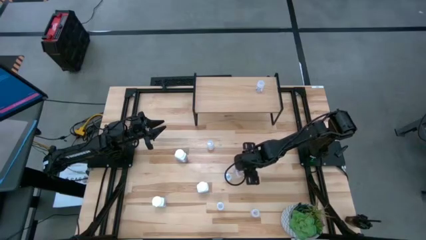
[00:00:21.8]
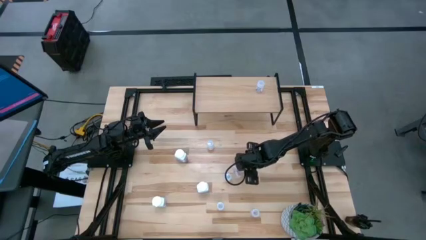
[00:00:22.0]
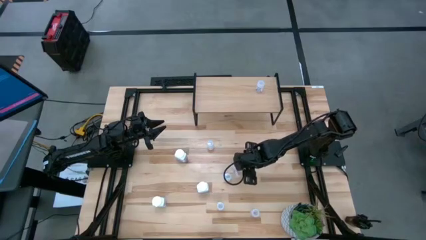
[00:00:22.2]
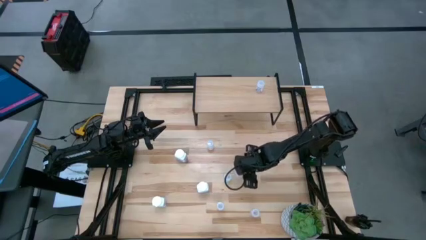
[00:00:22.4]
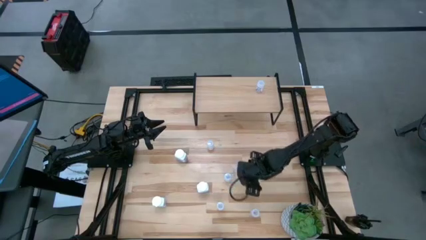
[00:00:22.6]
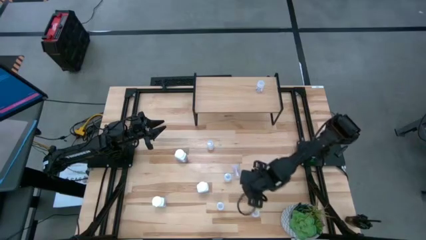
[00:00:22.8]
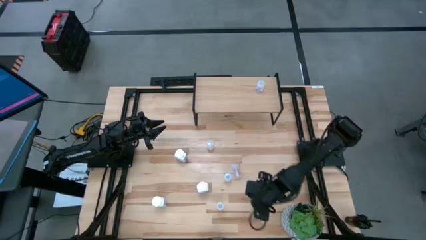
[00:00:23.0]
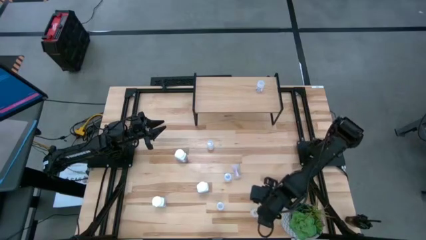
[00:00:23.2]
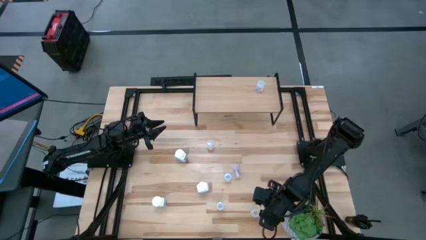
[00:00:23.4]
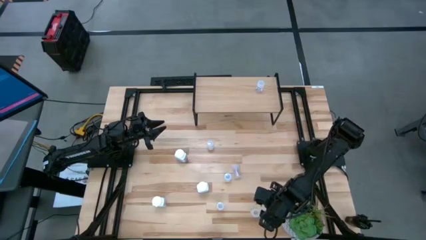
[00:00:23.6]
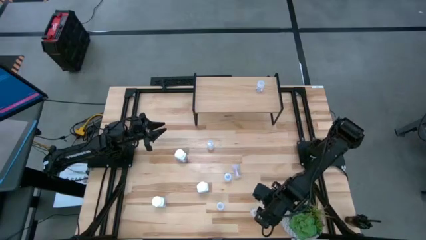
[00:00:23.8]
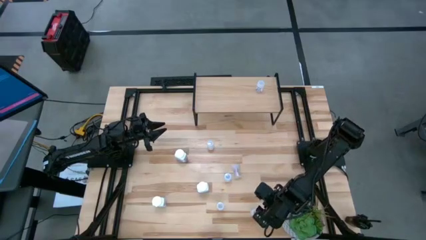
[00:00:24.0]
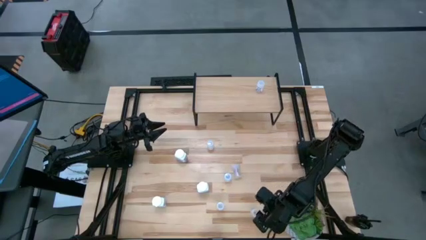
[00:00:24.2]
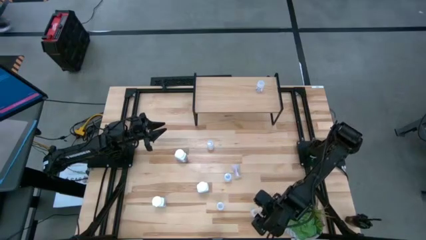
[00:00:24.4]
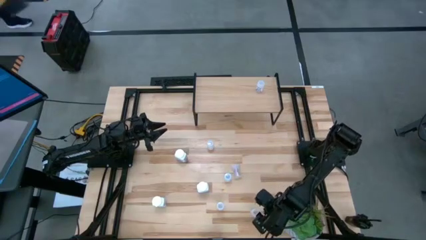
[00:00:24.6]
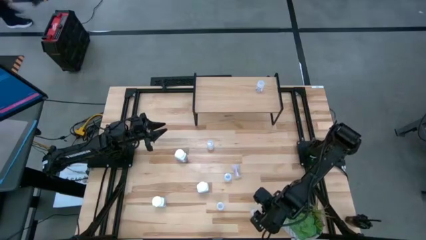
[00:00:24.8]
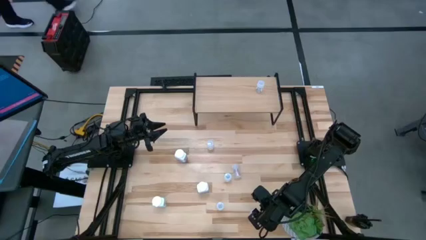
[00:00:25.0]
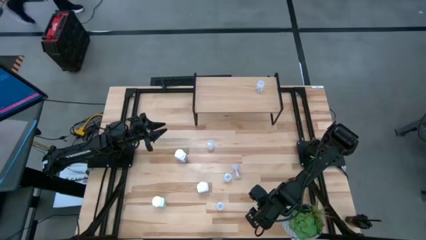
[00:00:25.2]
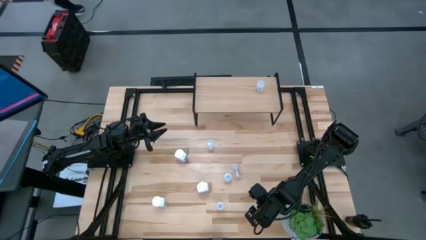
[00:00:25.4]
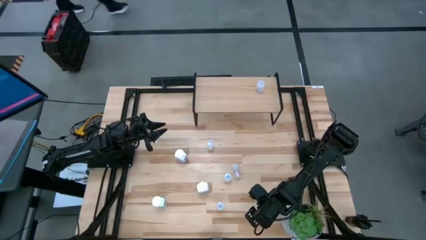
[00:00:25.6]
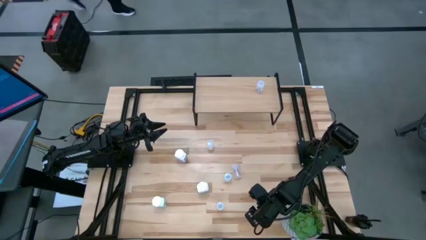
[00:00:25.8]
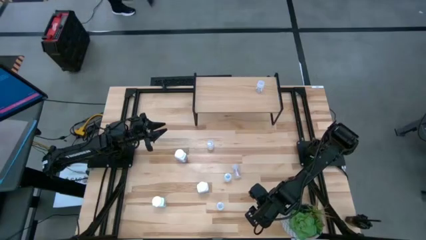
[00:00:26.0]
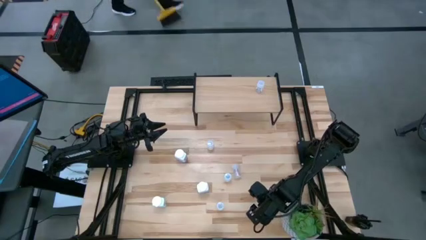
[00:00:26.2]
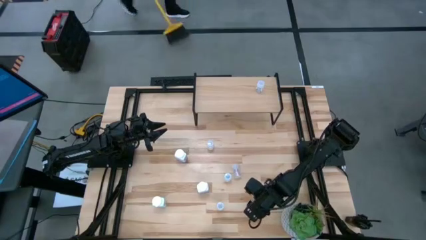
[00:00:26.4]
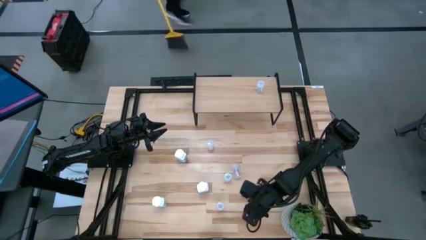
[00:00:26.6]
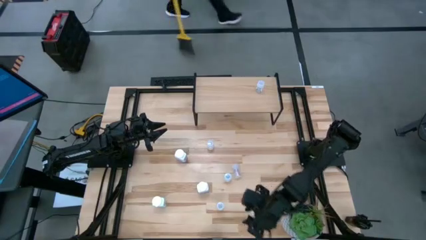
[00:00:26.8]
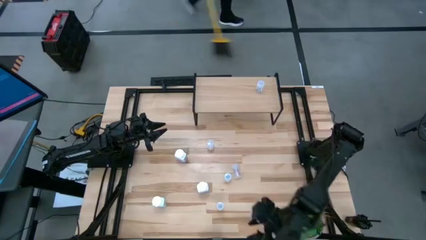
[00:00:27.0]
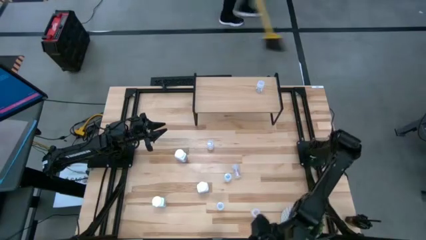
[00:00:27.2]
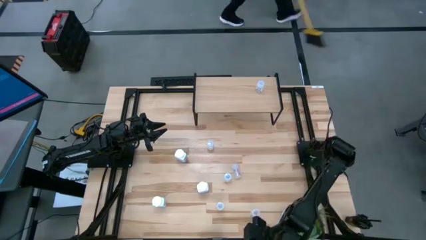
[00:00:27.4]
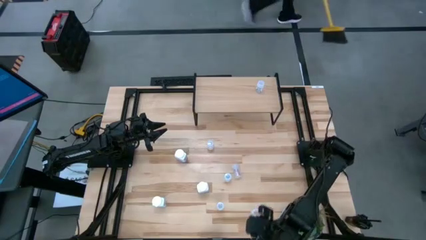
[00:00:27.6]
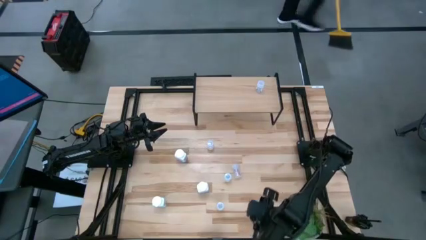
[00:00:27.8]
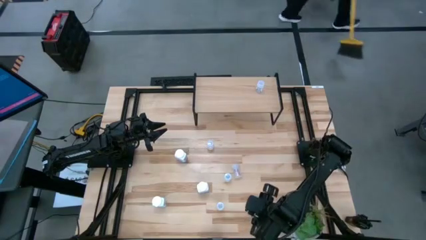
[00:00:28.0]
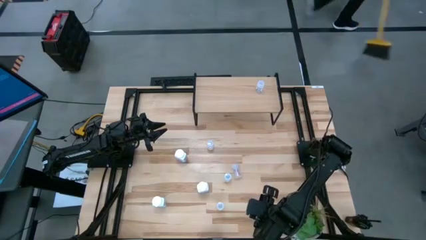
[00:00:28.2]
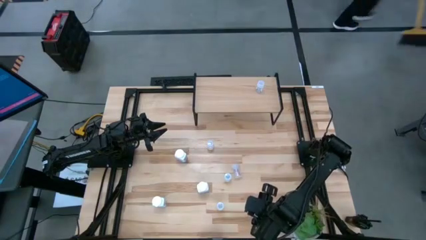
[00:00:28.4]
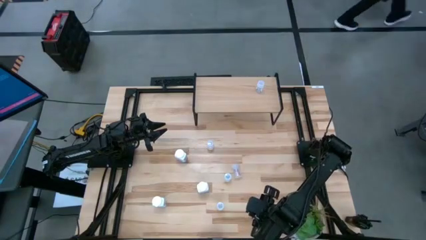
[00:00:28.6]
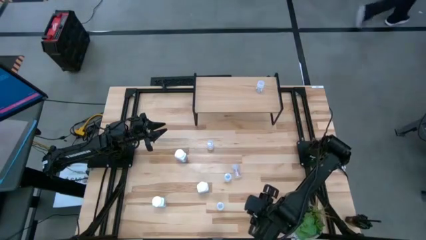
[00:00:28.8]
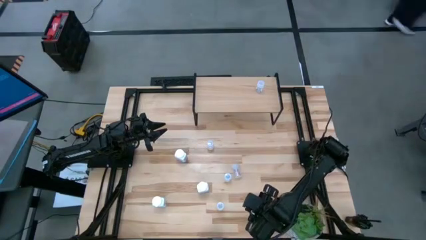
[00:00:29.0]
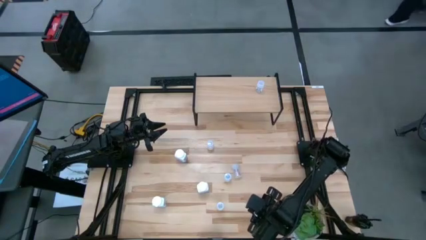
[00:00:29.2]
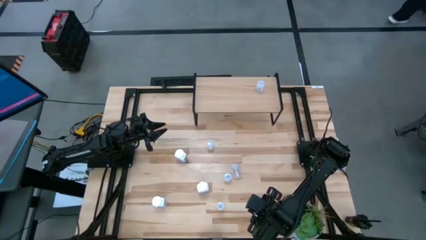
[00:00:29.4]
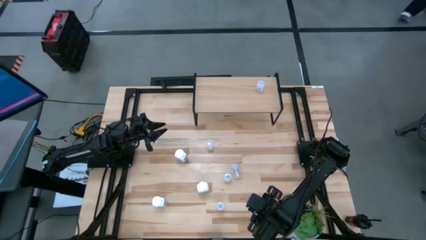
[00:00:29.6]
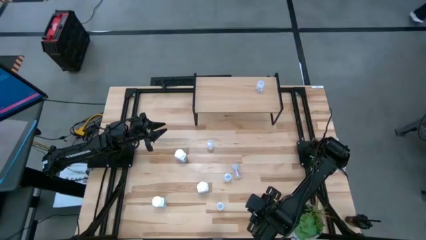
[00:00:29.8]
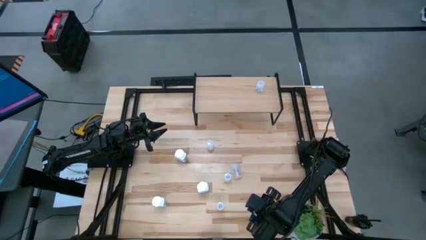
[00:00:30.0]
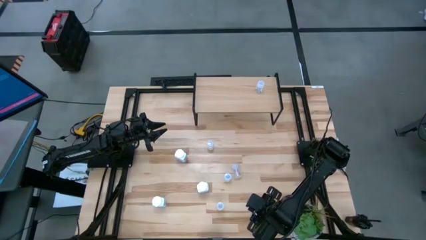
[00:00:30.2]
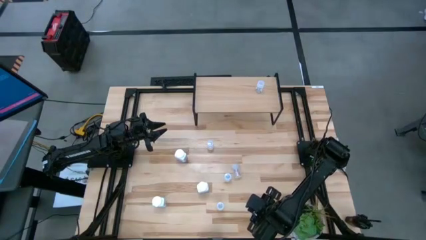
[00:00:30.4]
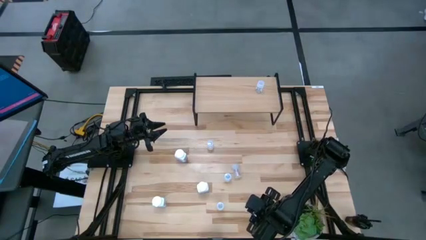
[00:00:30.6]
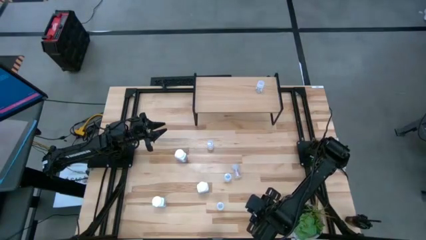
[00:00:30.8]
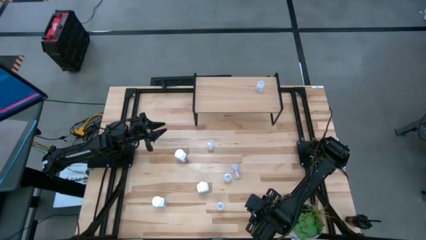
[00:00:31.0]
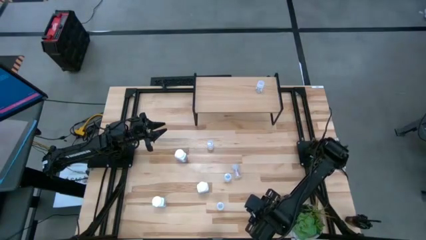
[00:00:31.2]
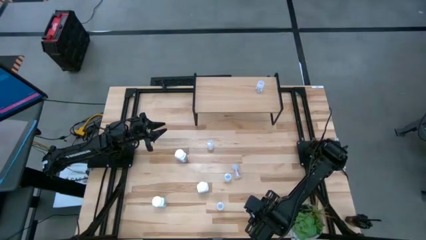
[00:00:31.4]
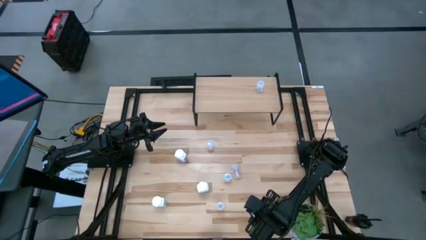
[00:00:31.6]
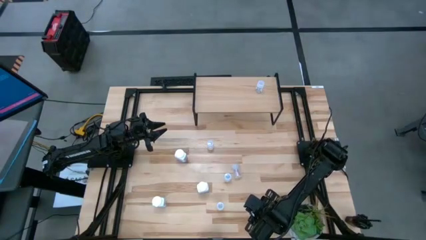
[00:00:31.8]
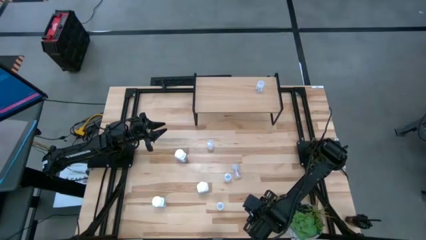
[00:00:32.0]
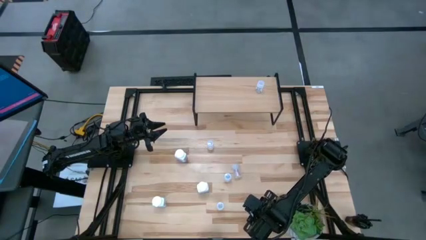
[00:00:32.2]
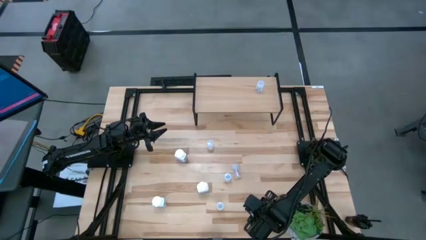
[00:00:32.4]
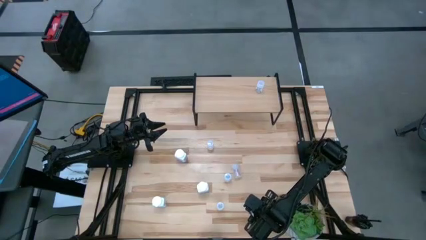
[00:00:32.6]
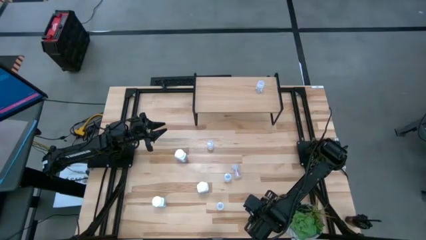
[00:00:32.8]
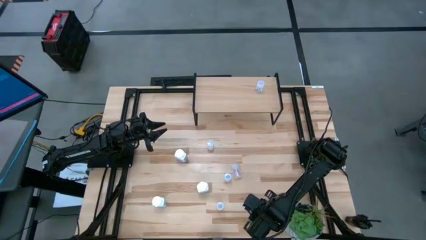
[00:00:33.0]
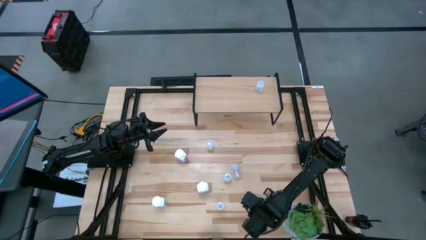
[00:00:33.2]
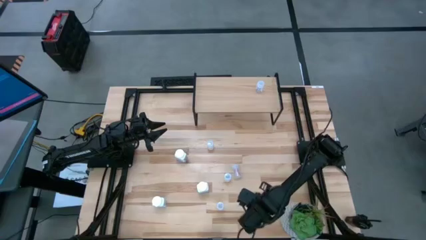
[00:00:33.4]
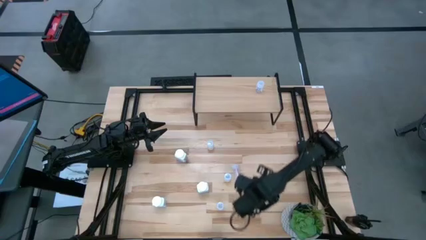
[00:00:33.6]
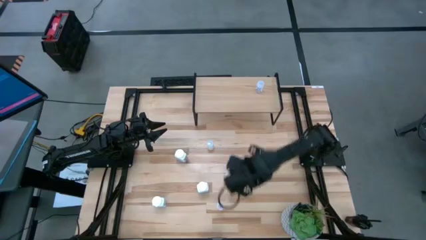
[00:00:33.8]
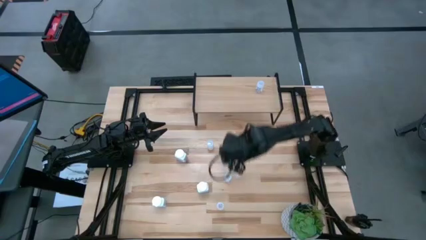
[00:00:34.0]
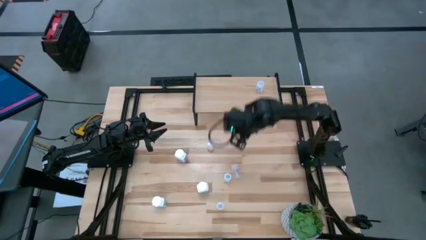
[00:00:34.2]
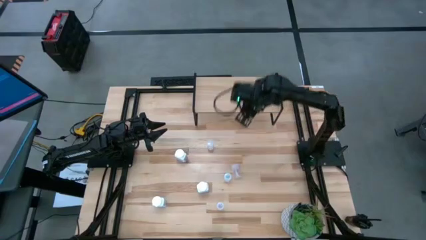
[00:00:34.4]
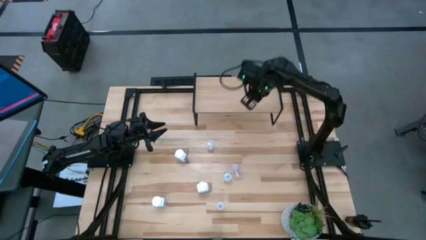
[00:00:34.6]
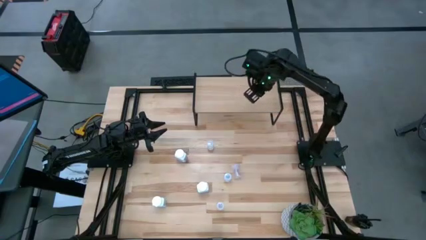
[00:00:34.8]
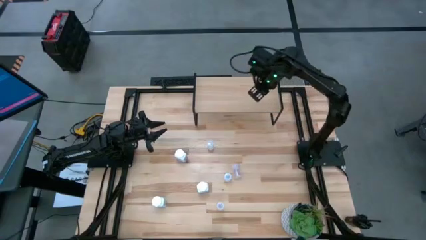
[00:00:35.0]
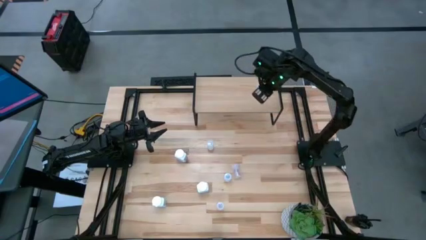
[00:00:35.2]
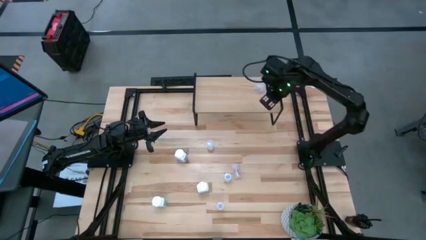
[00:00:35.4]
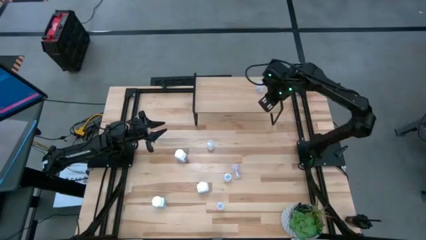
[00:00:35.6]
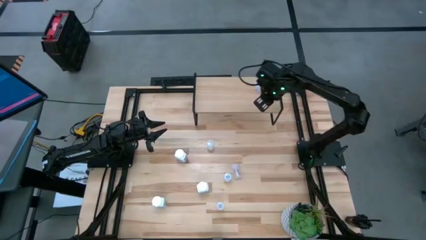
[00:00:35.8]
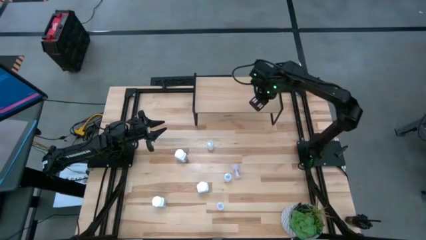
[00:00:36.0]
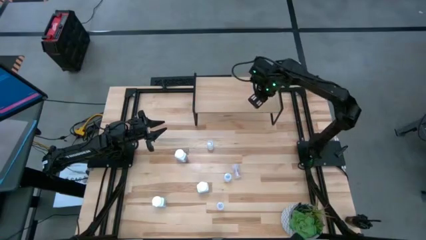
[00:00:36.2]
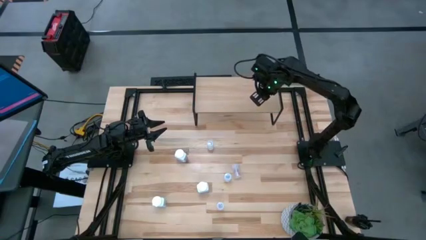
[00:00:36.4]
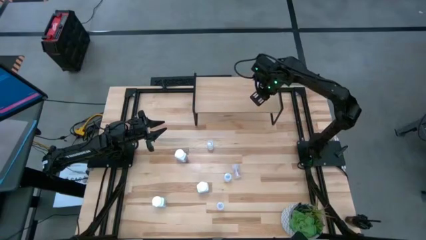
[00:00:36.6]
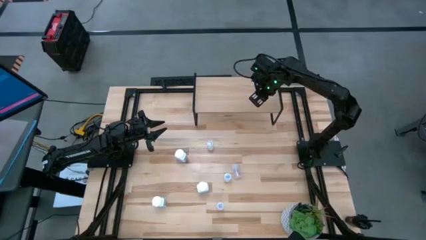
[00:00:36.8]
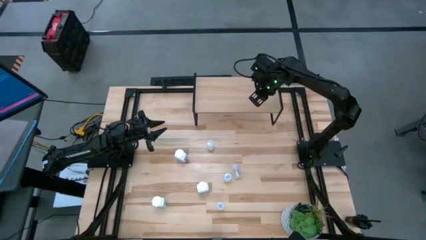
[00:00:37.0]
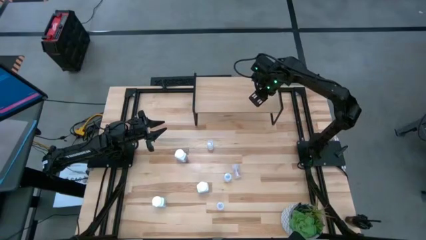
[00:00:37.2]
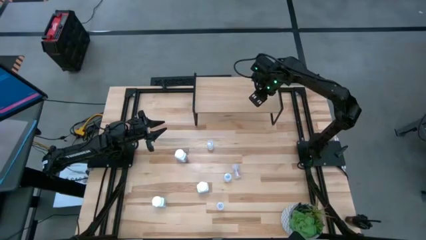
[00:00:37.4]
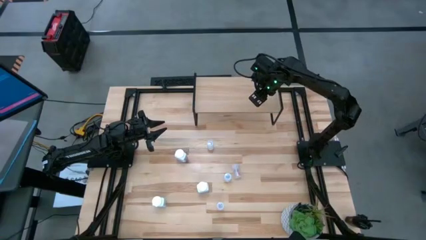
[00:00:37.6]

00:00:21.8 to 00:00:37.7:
Task: Pick and place medicine bottles onto shelf by color
Put the bottom transparent pill bottle on the shelf aligned with the other transparent pill bottle
